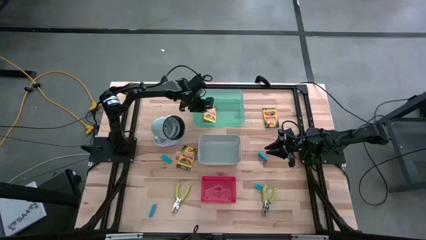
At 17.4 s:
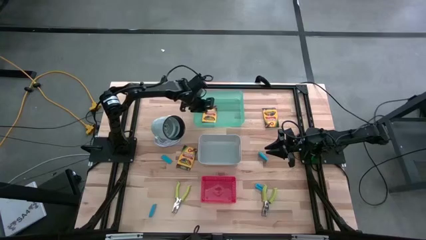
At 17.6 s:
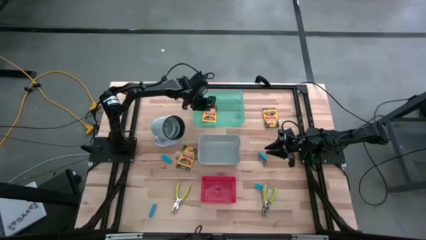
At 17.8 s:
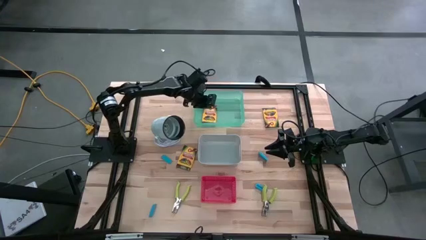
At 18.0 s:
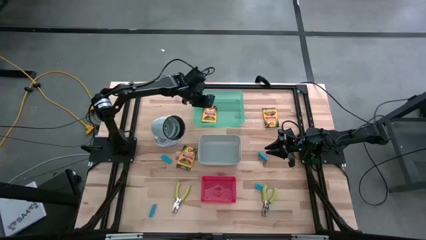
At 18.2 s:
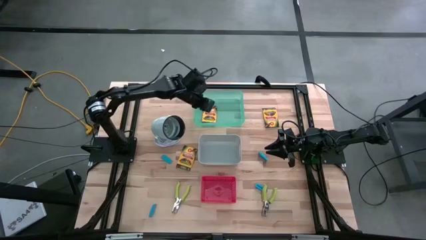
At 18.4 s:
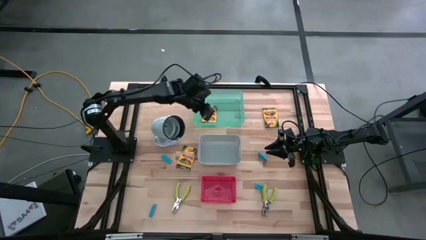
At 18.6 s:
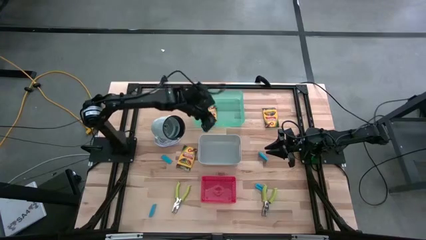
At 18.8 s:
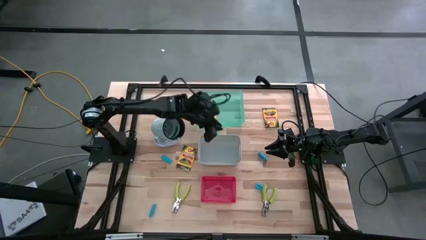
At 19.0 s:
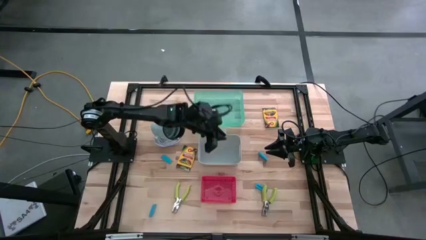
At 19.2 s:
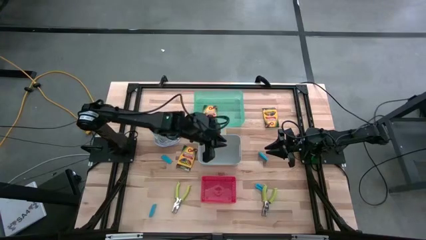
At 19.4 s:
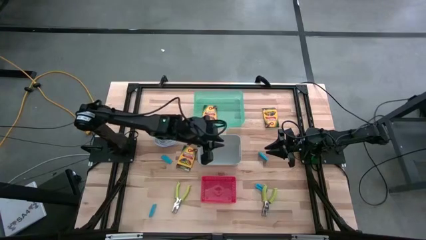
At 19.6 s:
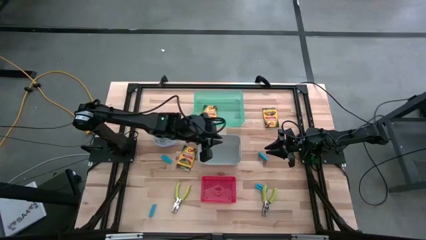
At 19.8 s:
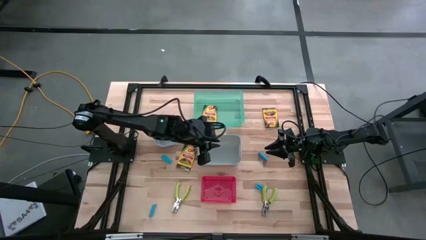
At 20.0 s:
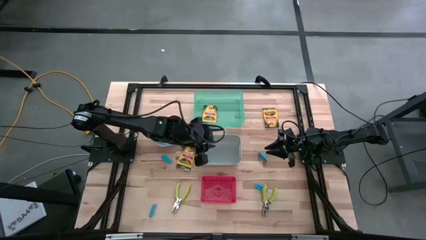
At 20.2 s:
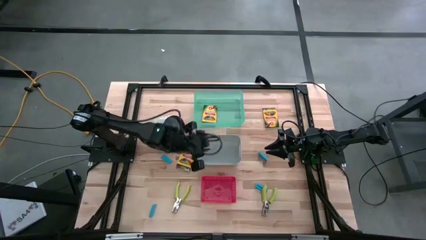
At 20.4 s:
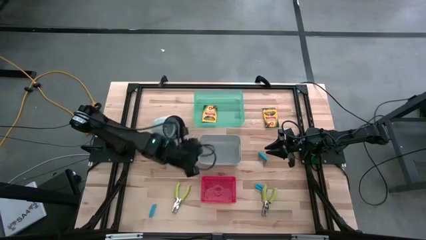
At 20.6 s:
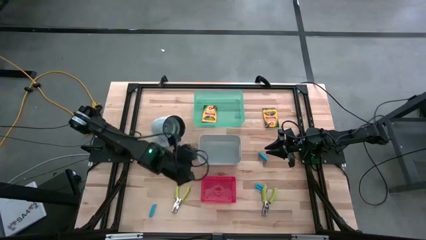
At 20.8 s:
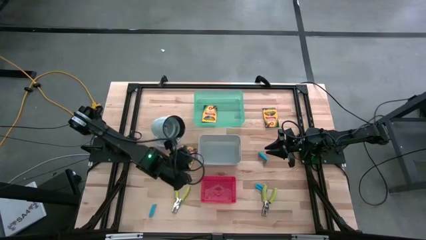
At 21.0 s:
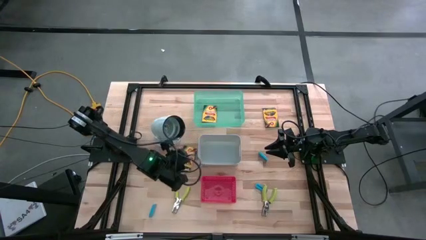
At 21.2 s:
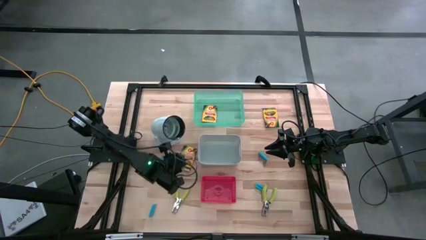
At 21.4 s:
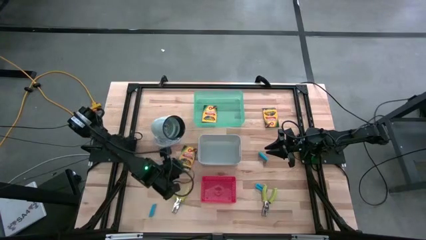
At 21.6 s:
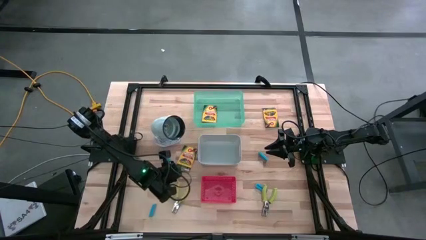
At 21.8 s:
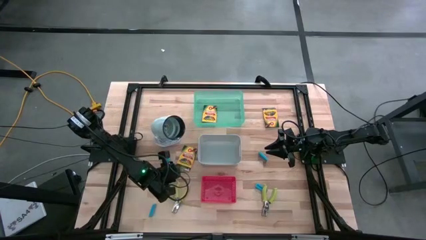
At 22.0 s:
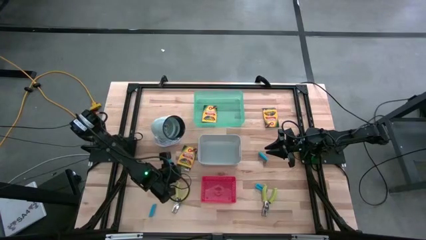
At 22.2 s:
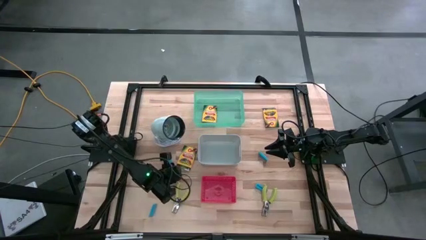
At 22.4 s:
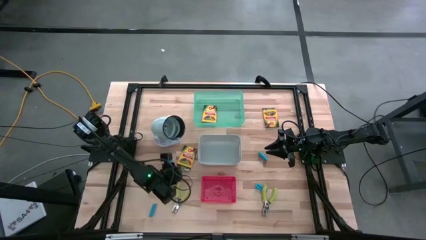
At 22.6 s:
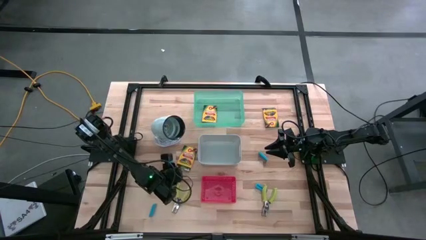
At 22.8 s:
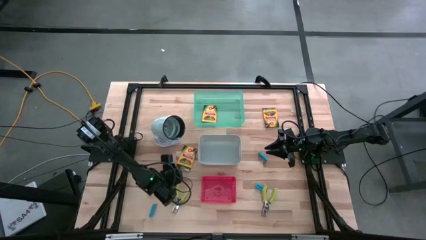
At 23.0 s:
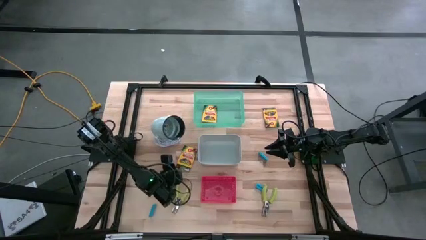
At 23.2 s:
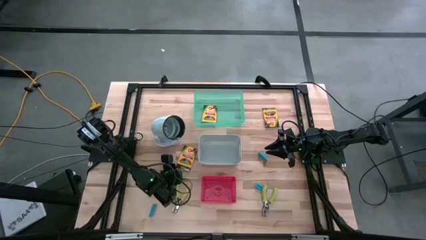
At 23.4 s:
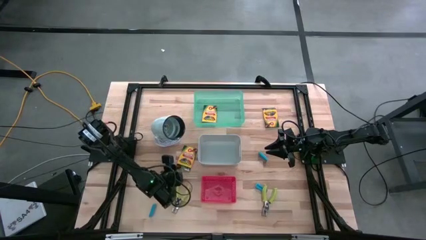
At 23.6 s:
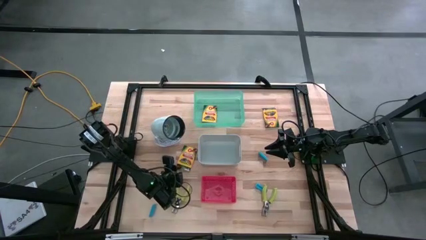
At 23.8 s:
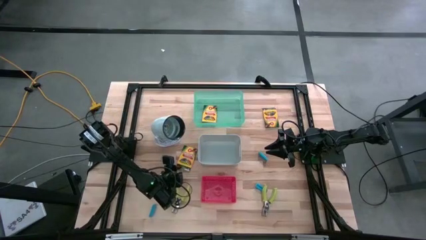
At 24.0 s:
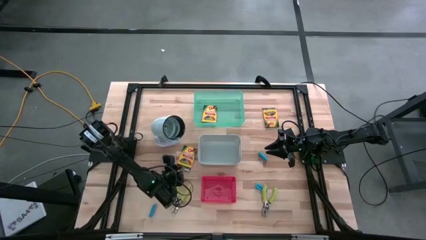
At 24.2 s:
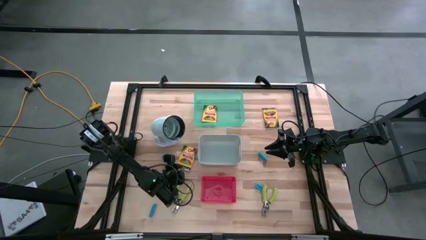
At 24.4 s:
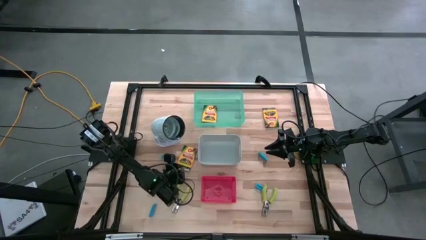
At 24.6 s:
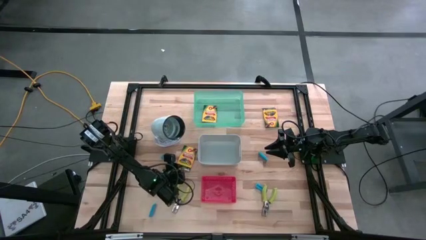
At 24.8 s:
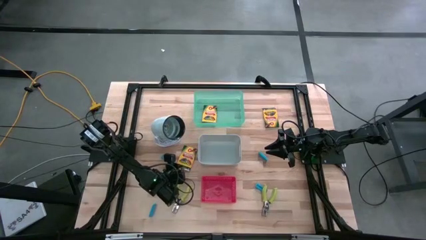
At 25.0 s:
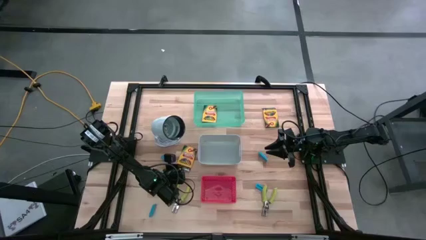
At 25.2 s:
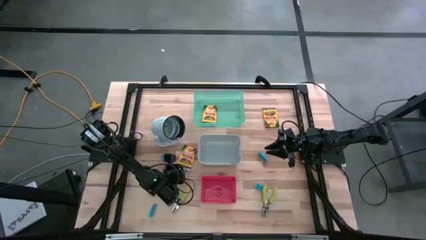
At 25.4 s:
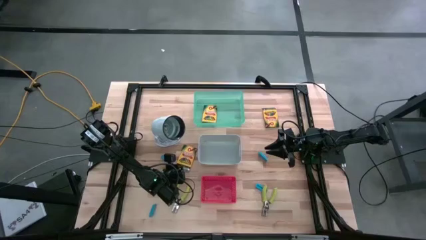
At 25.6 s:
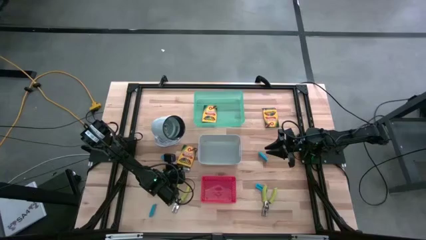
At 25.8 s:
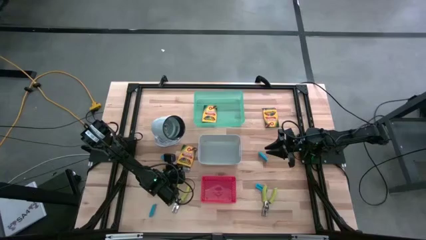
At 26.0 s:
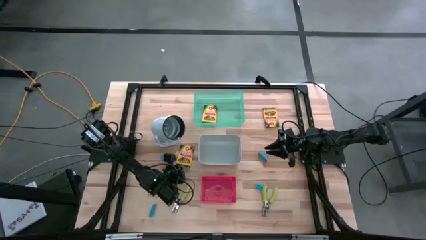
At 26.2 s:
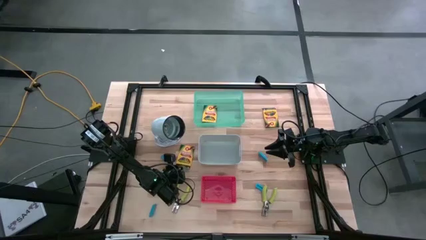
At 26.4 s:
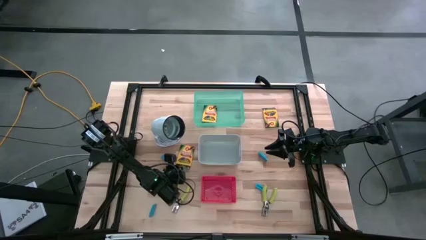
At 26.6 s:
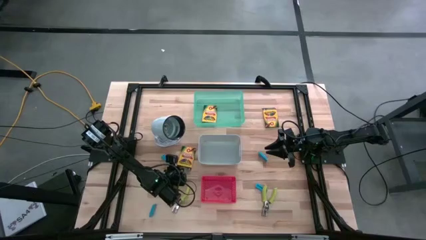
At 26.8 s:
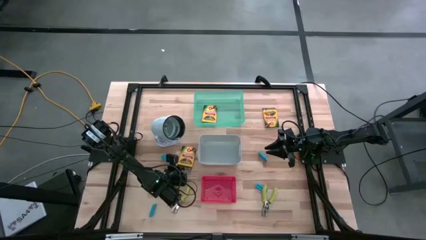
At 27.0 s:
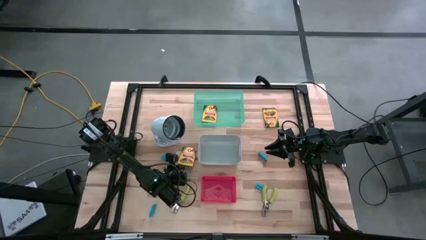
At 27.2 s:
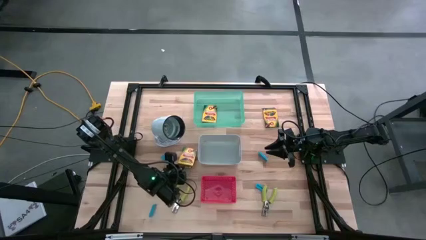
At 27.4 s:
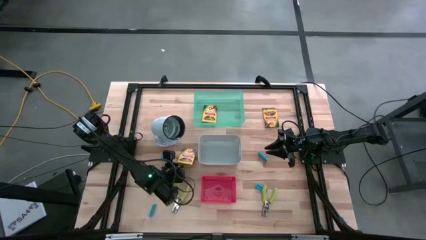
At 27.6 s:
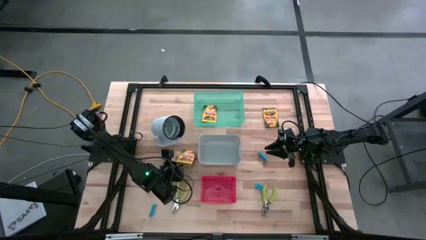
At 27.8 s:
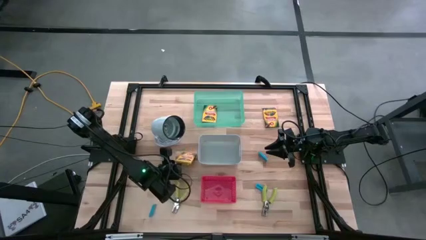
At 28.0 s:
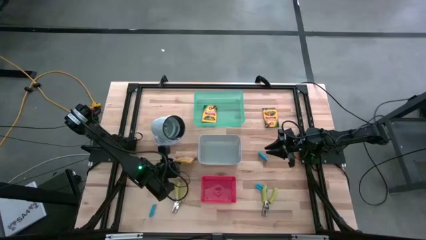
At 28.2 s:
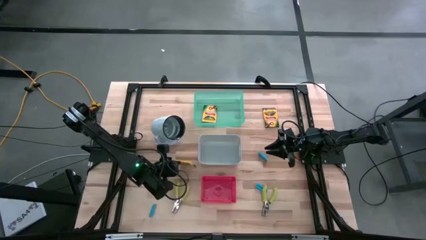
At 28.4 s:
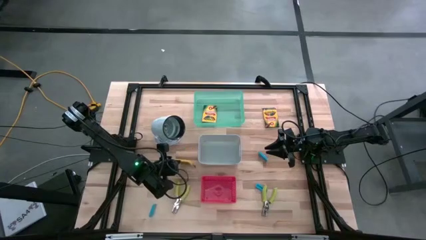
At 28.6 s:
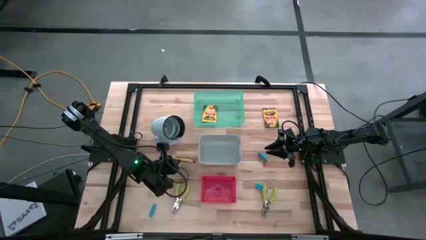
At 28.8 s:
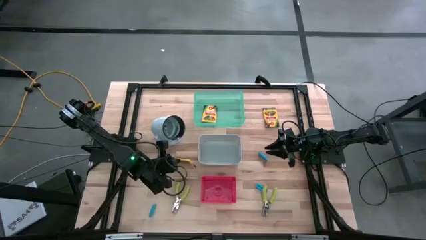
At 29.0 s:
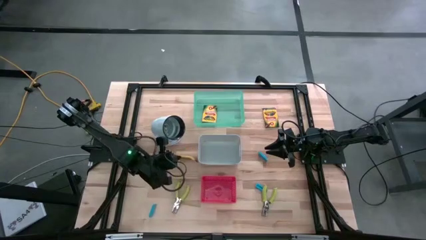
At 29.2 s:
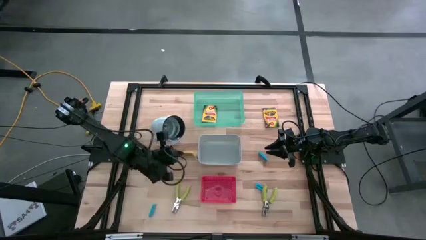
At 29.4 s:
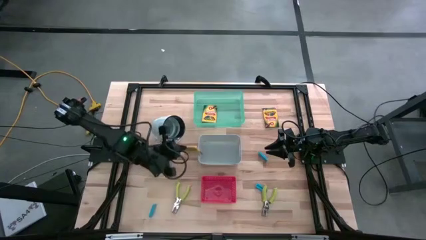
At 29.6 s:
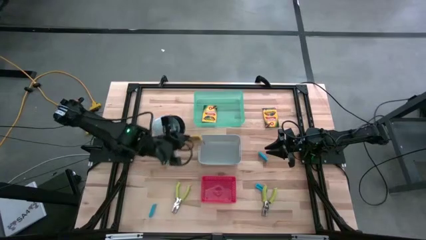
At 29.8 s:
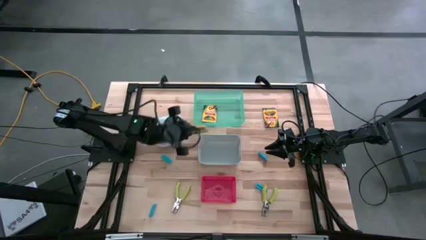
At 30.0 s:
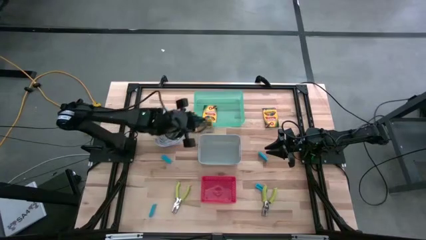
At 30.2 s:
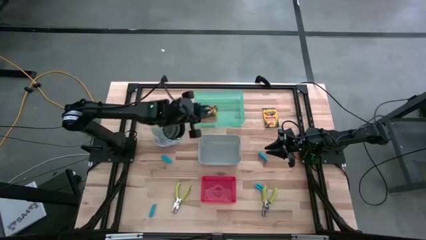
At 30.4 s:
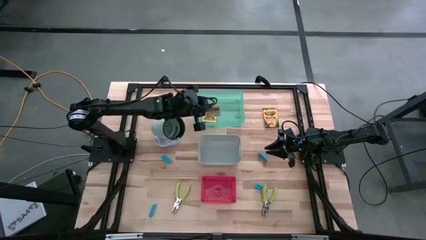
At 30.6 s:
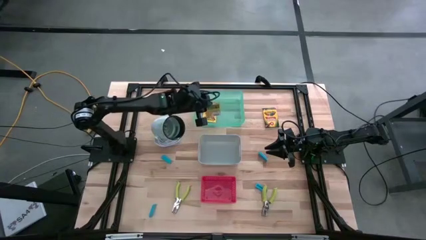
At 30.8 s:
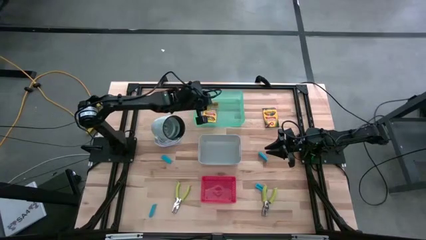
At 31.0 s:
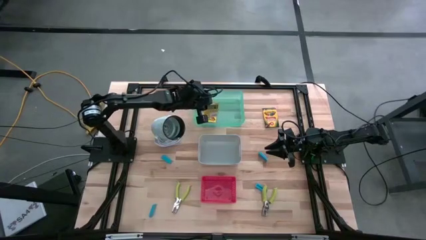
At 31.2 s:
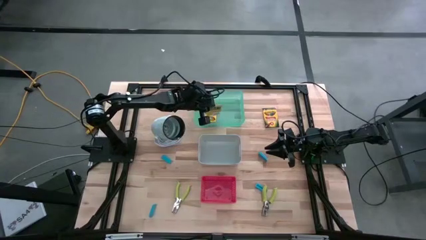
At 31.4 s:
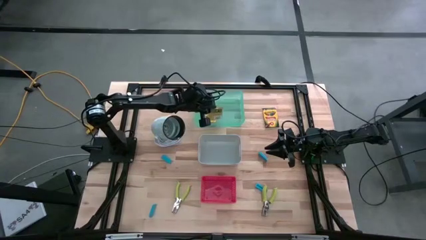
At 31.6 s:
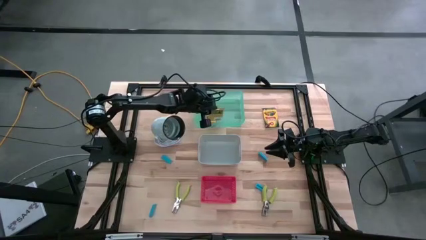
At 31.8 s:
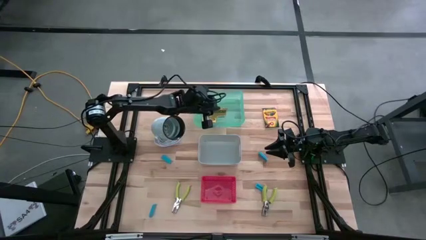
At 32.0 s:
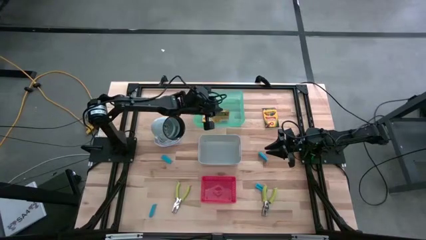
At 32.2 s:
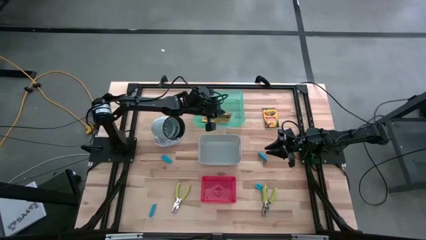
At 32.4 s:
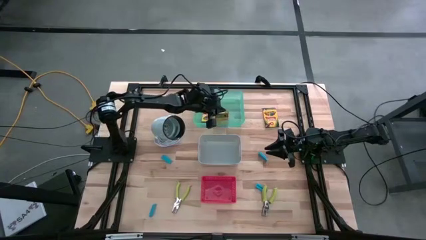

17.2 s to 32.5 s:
Task: Pick & Place School Supplies
Put the bottom yellow crayon box into the green bin
